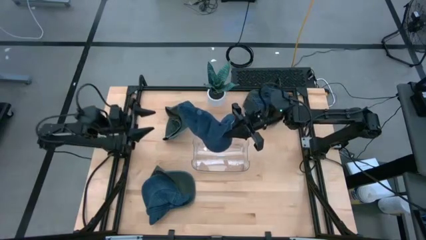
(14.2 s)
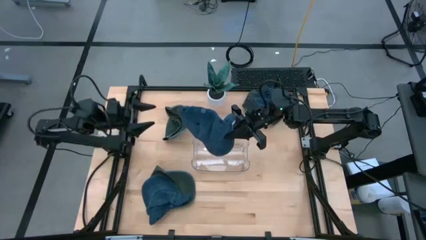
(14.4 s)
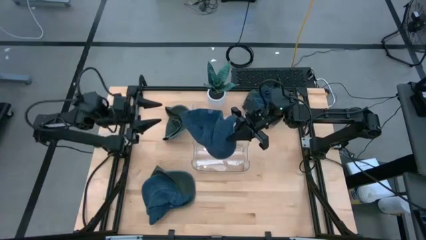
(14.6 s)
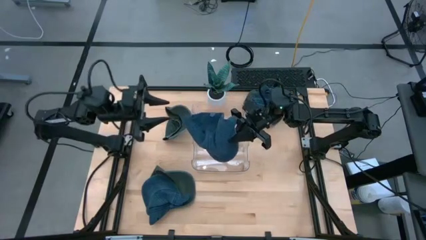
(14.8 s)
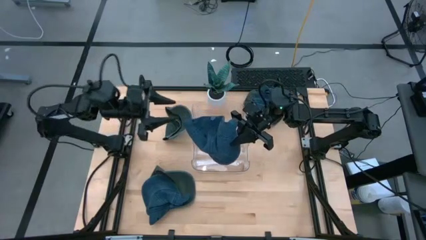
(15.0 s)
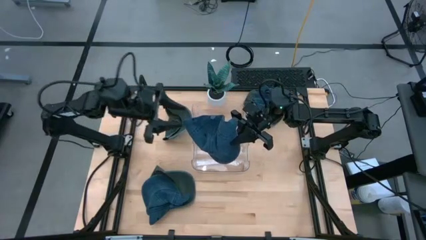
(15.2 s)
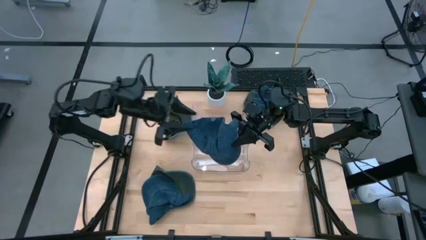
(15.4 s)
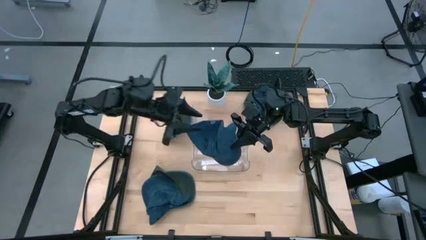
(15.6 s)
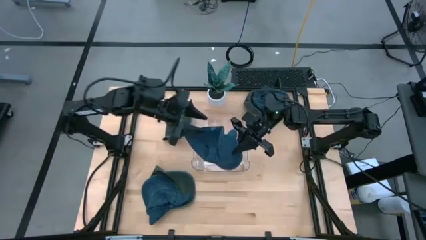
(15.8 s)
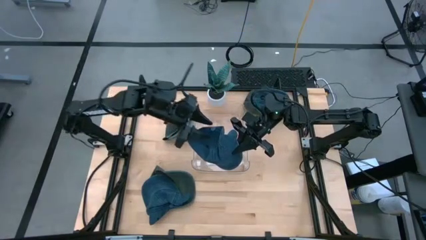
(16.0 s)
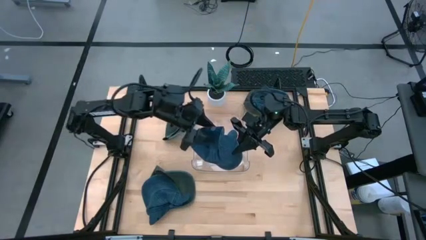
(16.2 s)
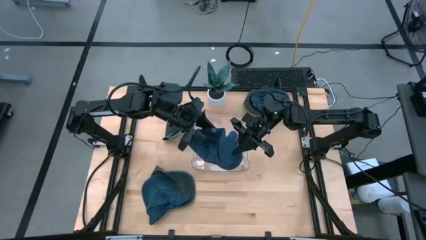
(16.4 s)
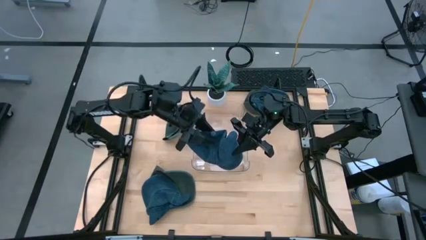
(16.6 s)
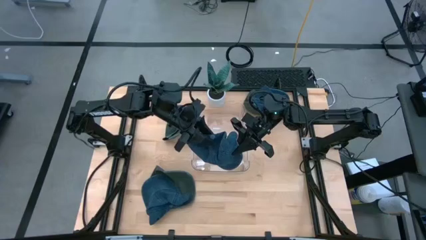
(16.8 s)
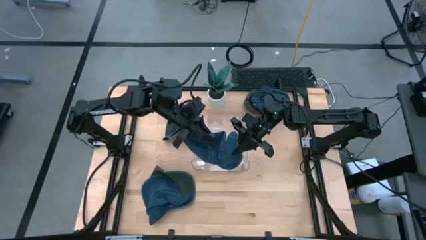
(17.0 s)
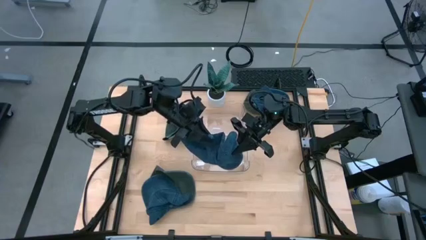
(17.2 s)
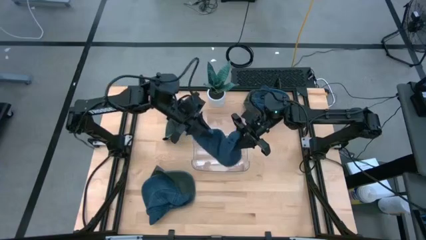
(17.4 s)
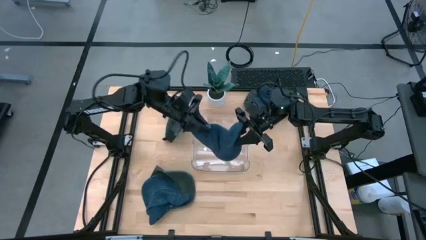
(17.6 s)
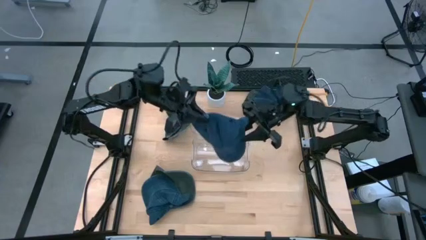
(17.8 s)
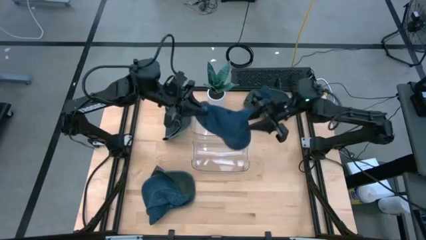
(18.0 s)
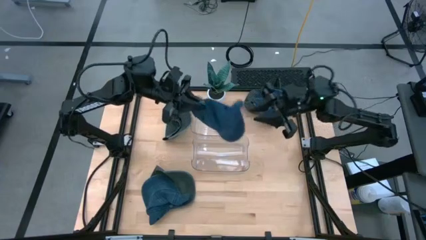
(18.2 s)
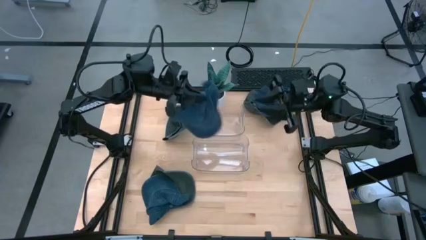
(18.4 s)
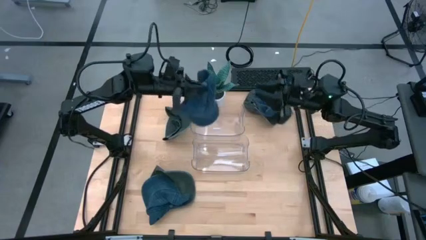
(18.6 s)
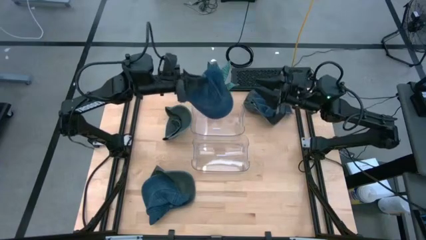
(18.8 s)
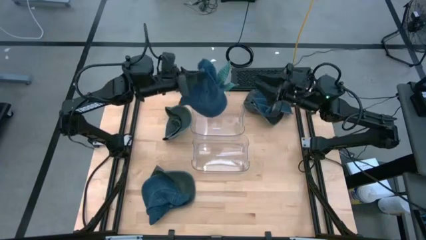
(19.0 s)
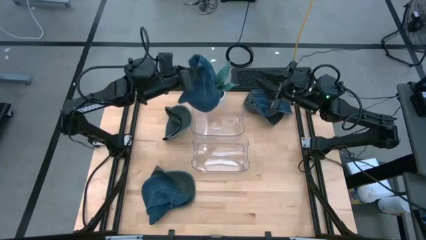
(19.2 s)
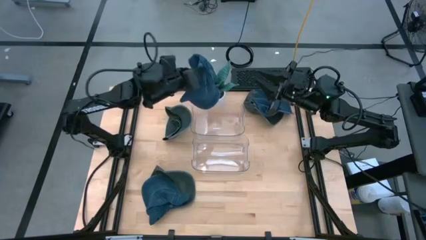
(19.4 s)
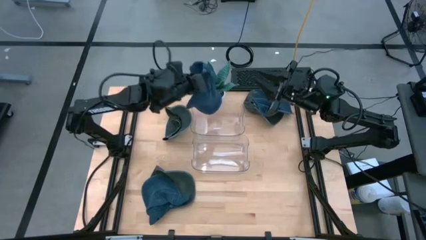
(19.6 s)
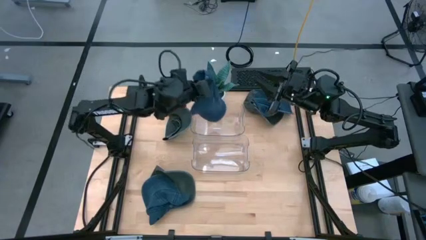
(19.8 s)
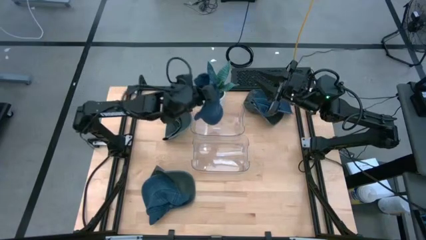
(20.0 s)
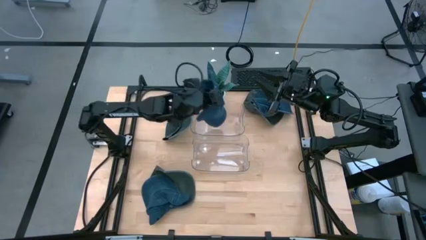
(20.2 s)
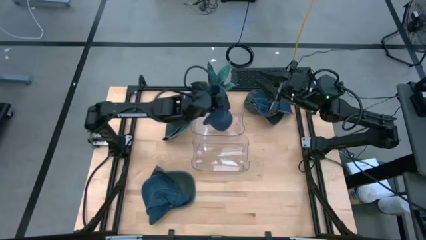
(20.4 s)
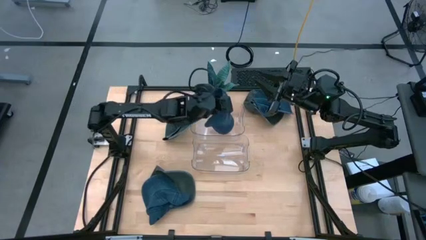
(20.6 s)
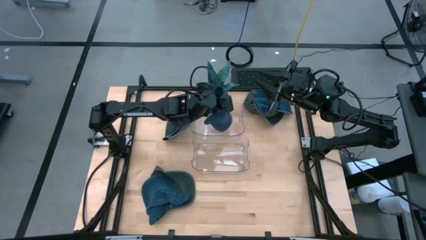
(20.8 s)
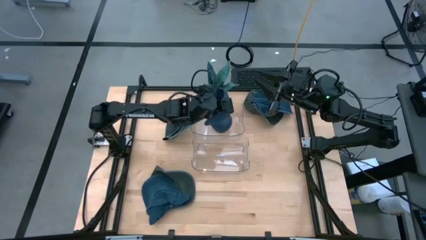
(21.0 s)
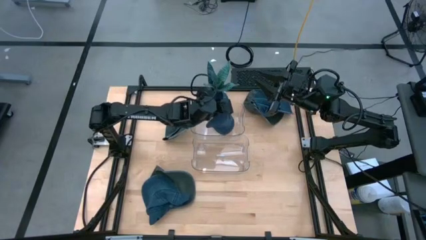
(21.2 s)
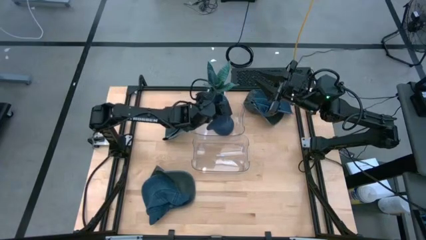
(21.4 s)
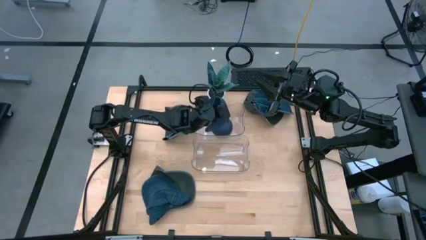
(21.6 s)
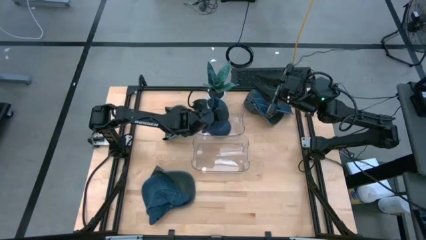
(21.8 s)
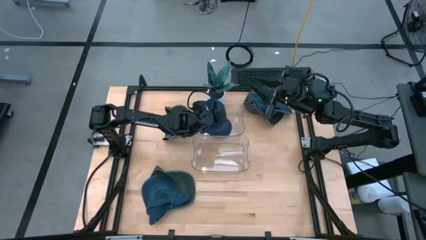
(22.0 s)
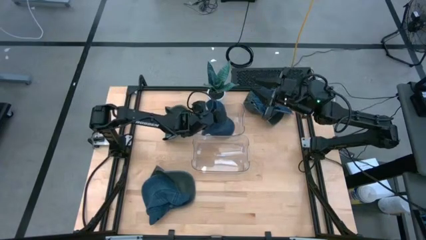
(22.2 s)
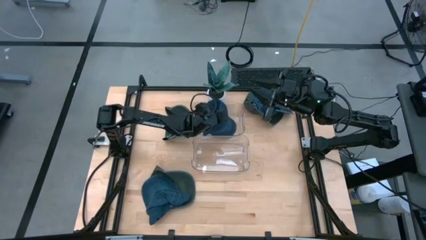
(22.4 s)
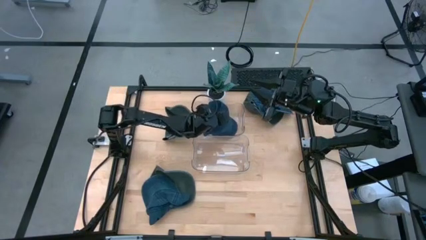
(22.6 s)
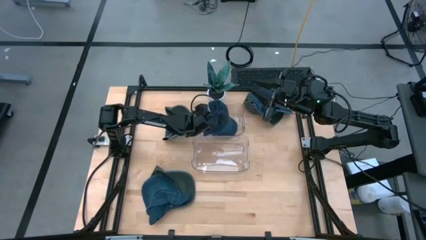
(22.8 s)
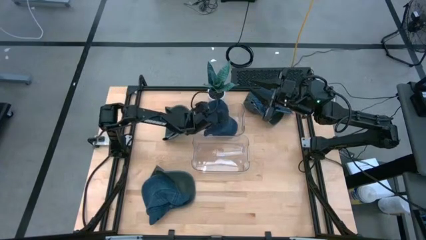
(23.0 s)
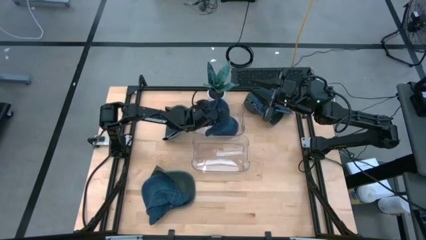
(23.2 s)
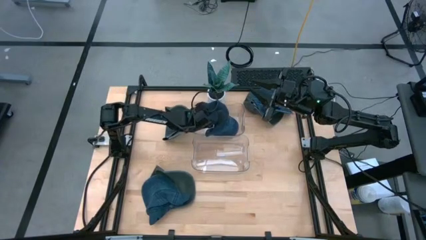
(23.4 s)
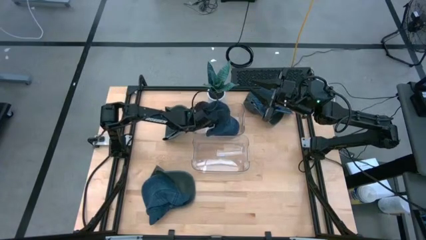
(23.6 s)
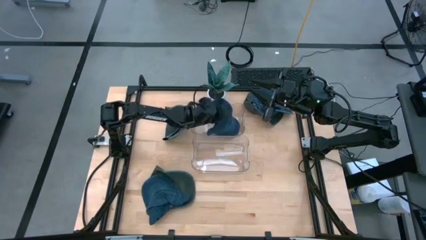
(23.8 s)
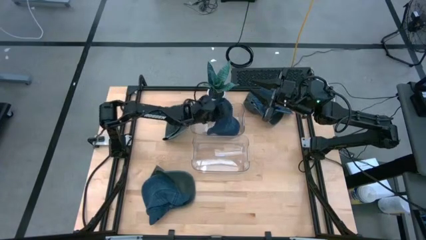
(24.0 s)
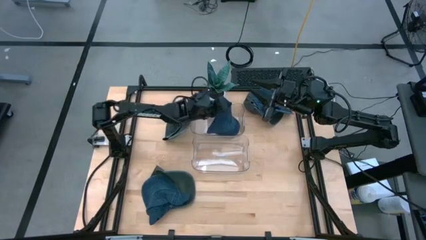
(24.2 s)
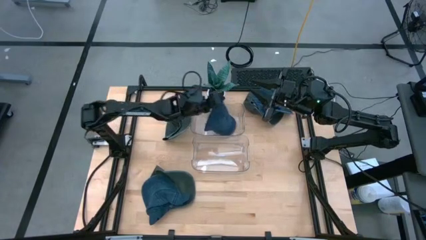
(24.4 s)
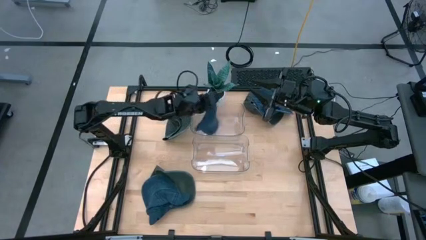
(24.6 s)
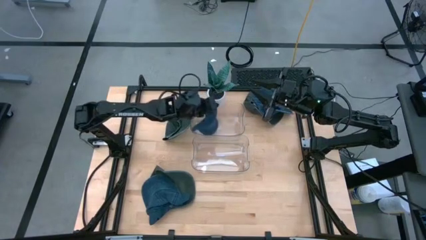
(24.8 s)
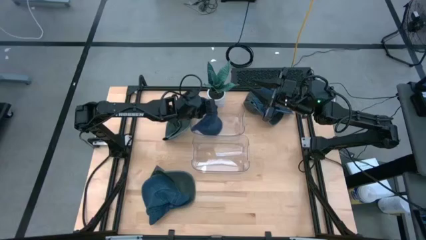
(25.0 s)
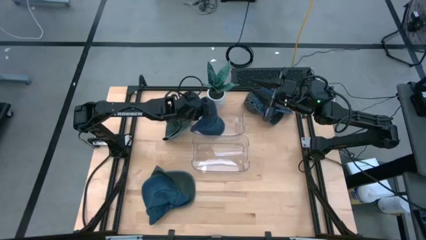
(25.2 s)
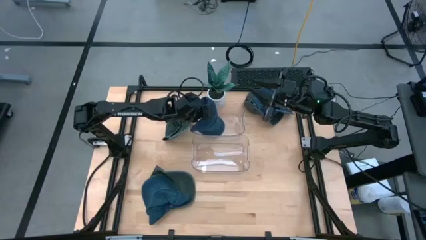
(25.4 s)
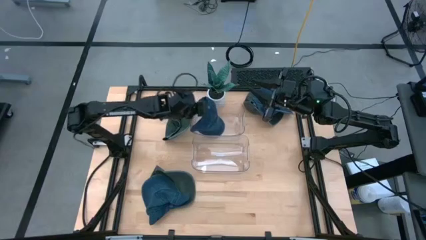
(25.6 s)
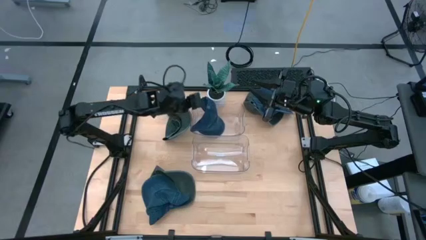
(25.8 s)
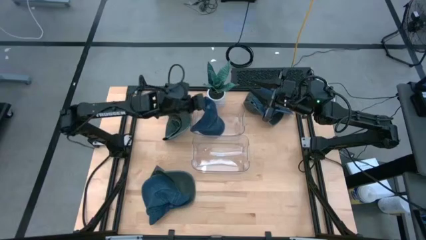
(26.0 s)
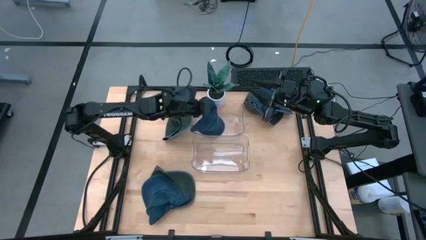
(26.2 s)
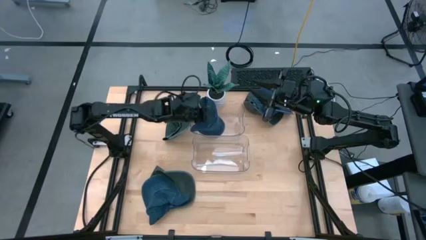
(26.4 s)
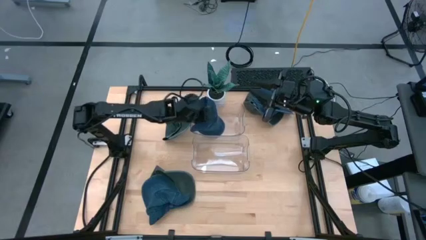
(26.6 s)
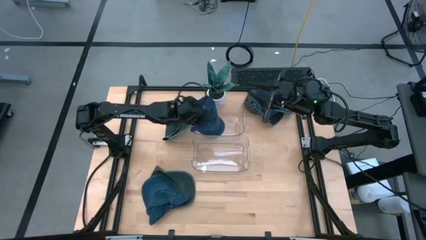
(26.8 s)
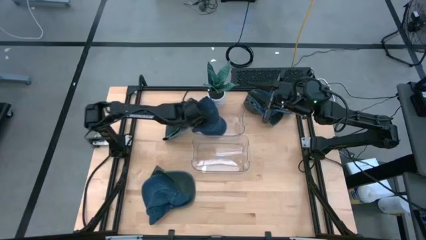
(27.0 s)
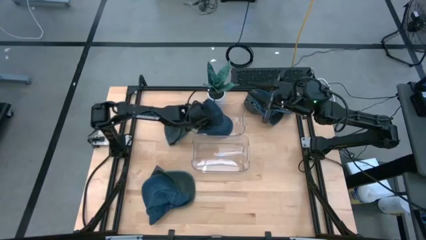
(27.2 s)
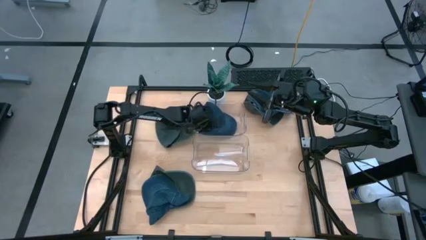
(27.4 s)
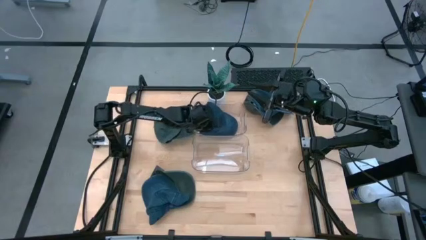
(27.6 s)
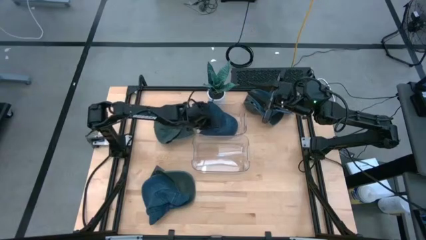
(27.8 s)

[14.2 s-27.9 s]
Task: Pick & Place hat
Put the bottom right blue cap into the top transparent bin

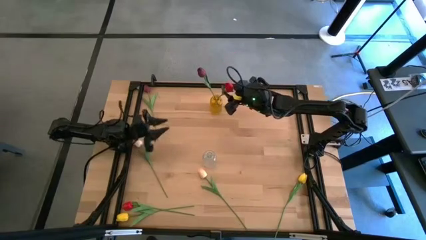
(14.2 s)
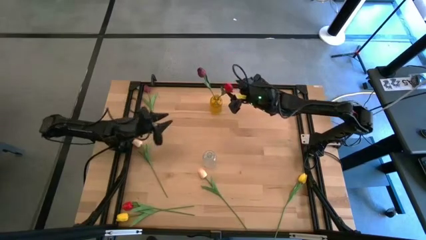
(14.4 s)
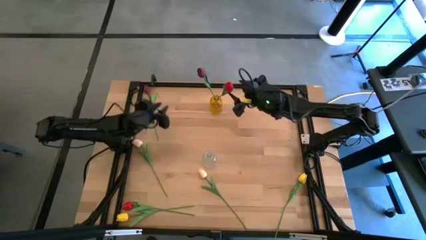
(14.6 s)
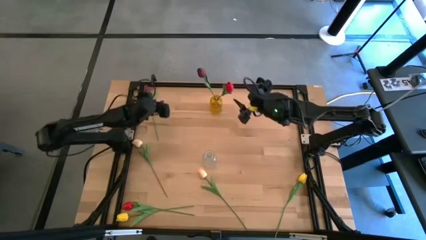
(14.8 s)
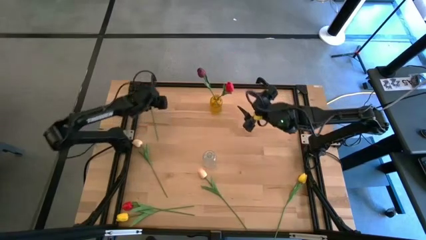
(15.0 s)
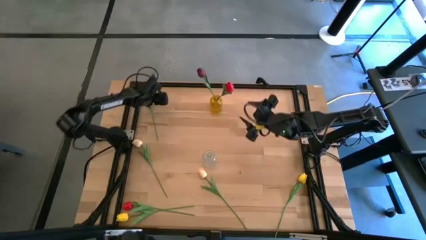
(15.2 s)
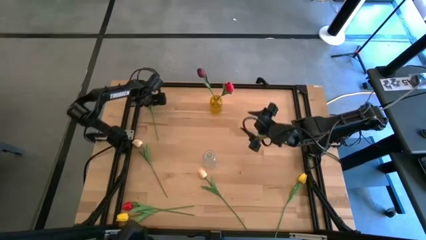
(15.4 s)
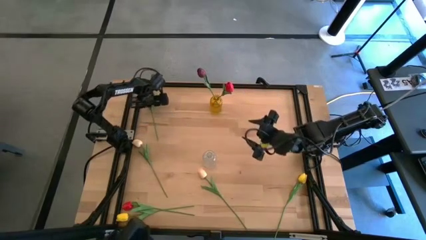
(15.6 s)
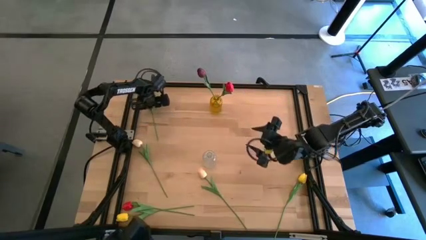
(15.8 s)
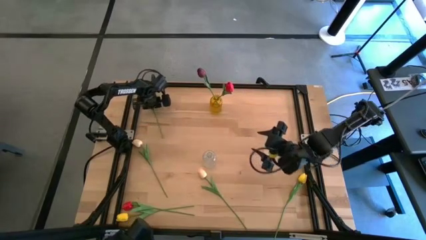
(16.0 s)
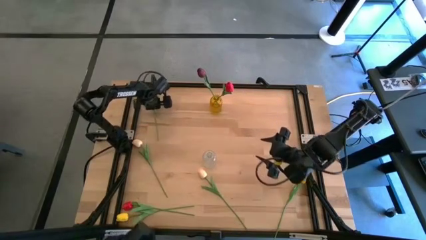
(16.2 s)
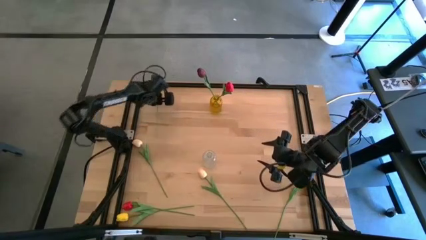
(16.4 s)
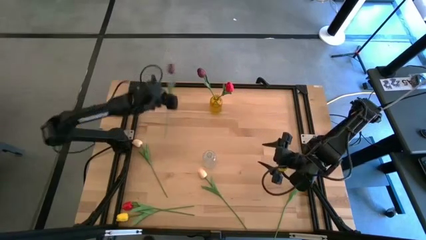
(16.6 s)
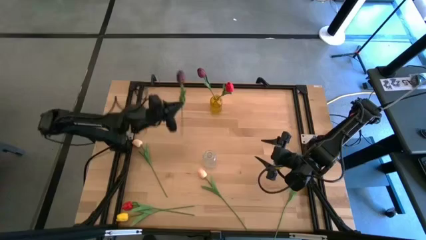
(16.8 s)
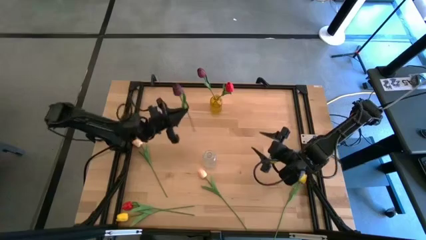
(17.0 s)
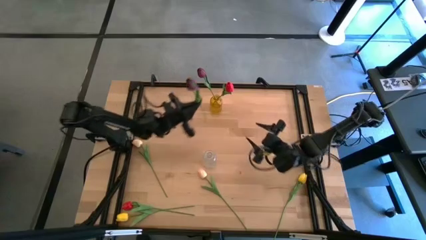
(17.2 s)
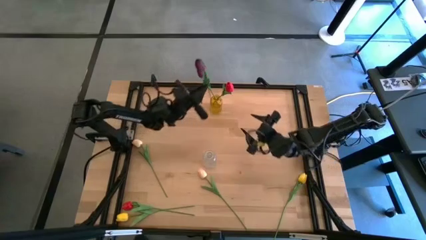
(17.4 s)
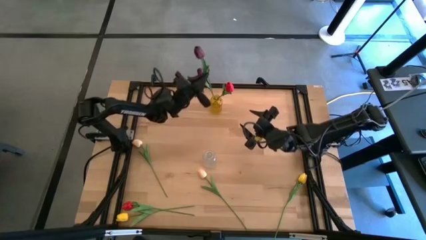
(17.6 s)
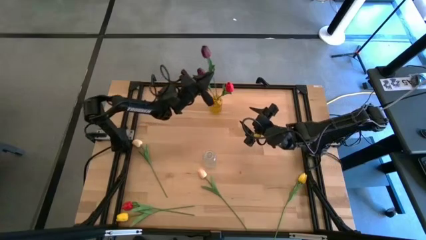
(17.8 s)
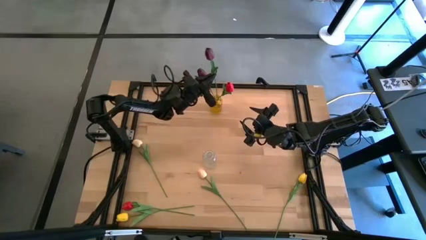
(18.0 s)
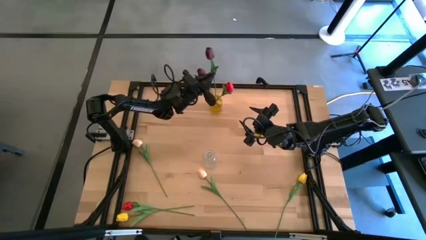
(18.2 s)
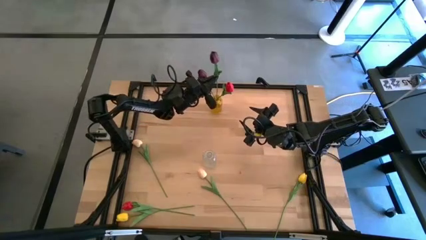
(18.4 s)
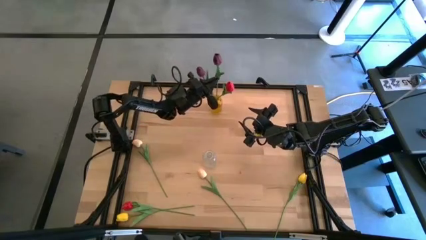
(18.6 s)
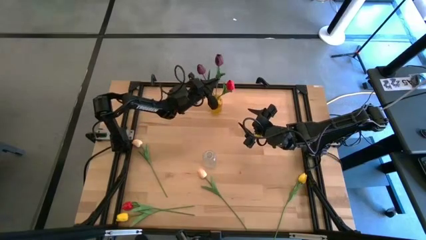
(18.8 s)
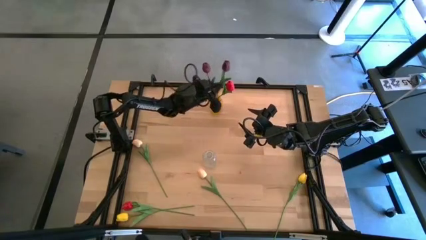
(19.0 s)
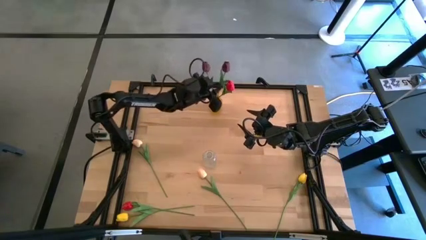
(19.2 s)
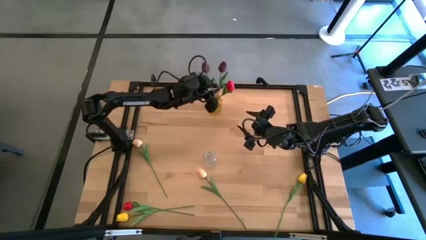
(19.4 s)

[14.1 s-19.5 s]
Task: Sort flowers into vase by color
Put the dark red flower into the yellow vase
